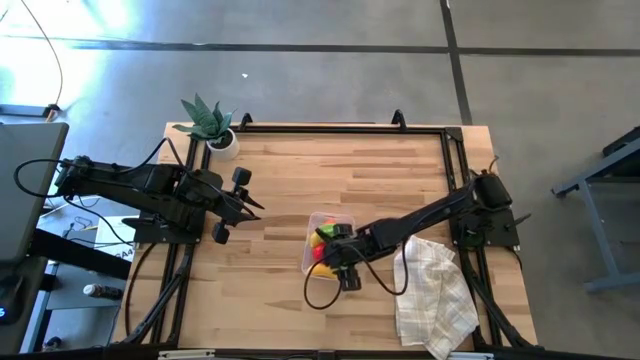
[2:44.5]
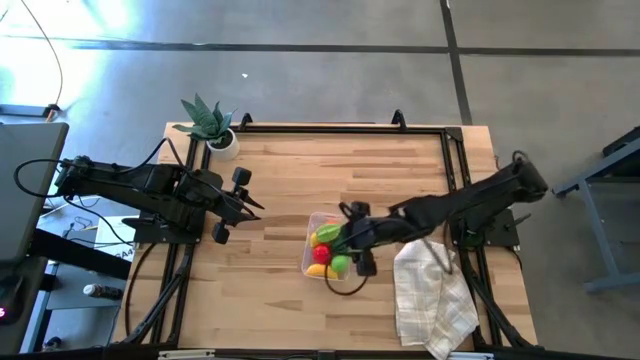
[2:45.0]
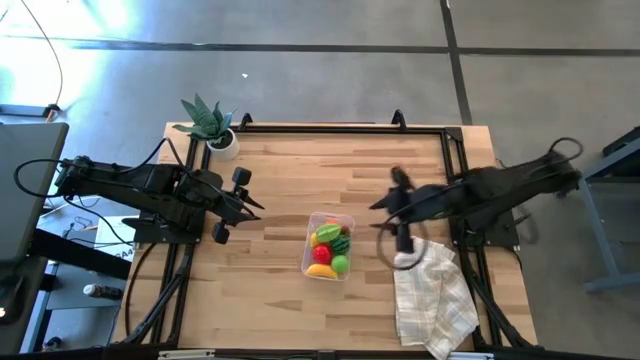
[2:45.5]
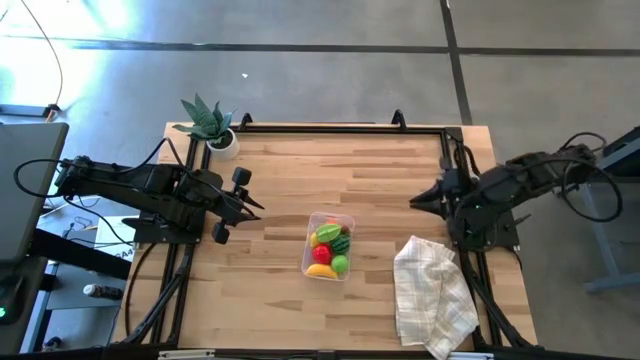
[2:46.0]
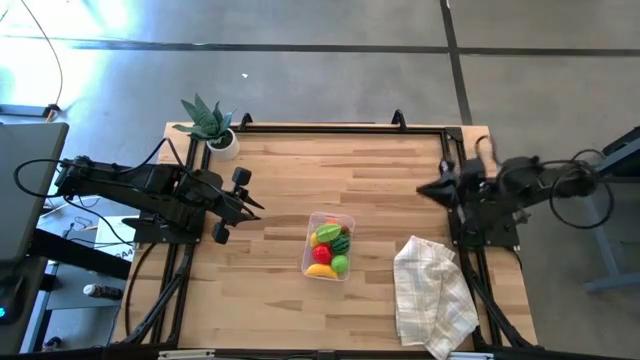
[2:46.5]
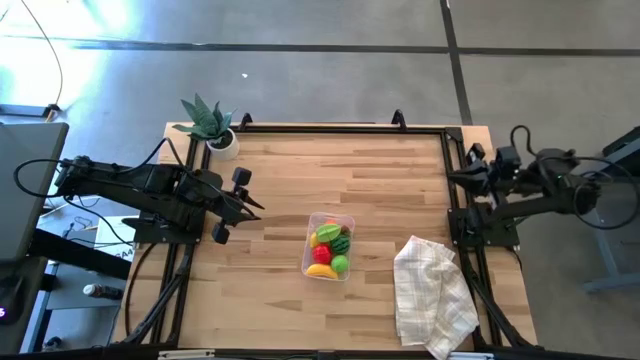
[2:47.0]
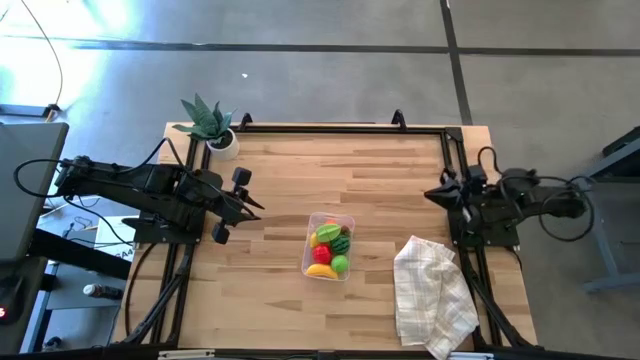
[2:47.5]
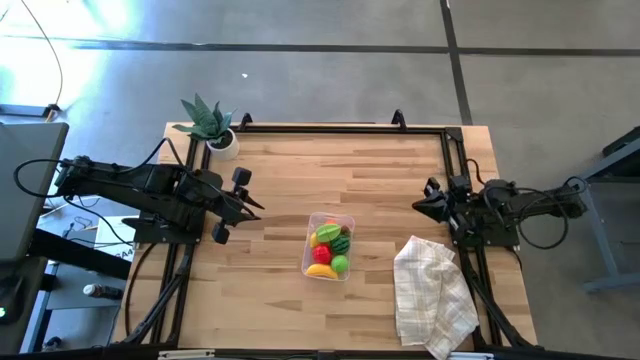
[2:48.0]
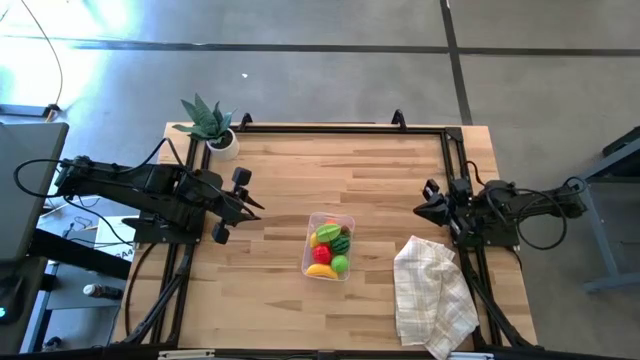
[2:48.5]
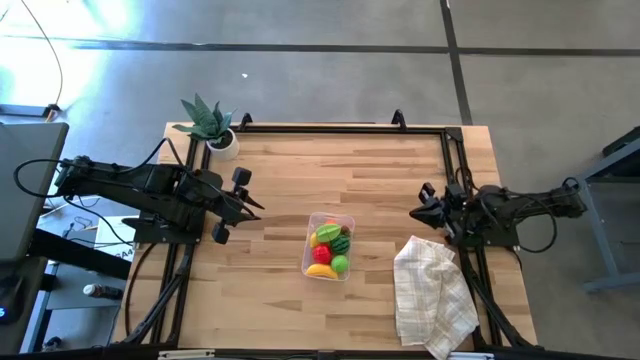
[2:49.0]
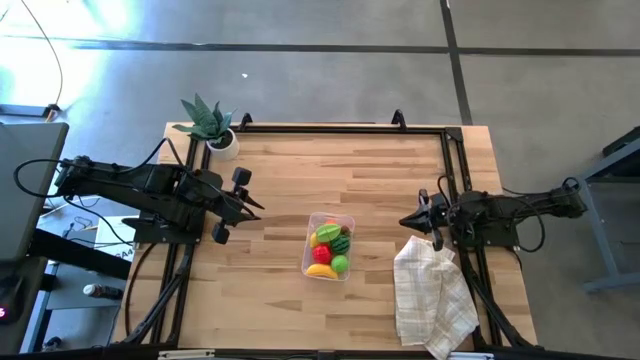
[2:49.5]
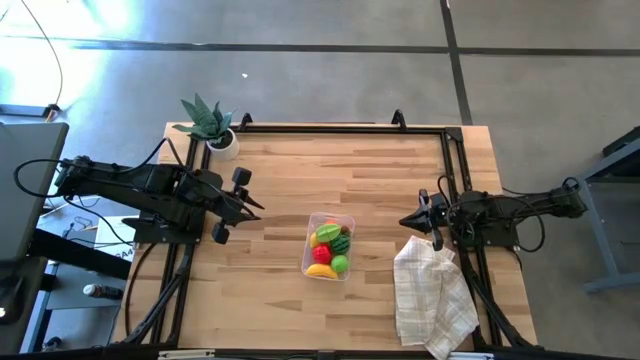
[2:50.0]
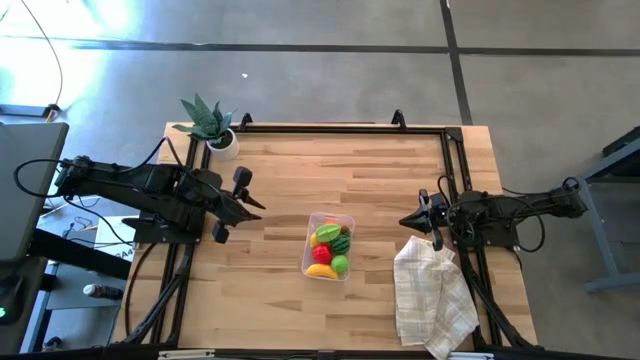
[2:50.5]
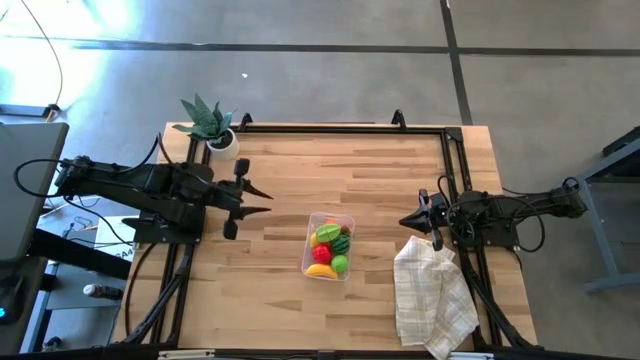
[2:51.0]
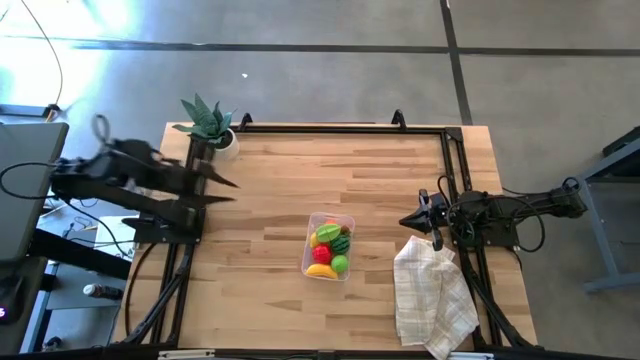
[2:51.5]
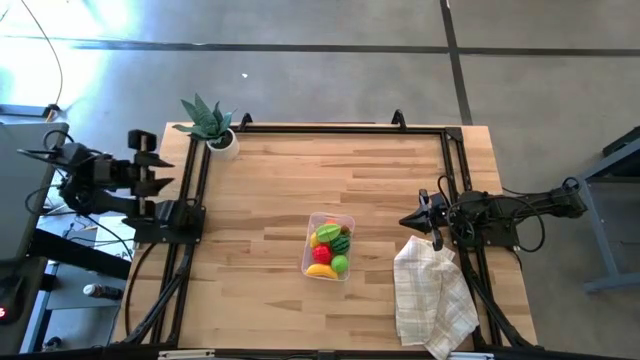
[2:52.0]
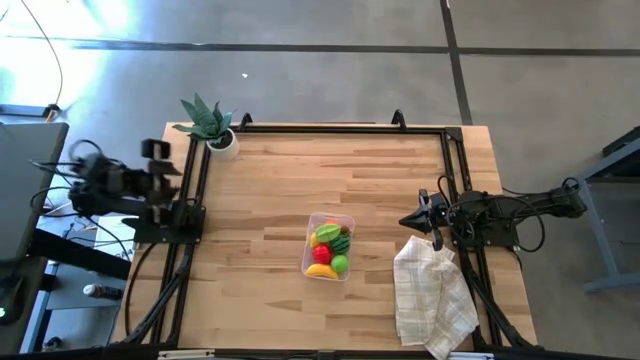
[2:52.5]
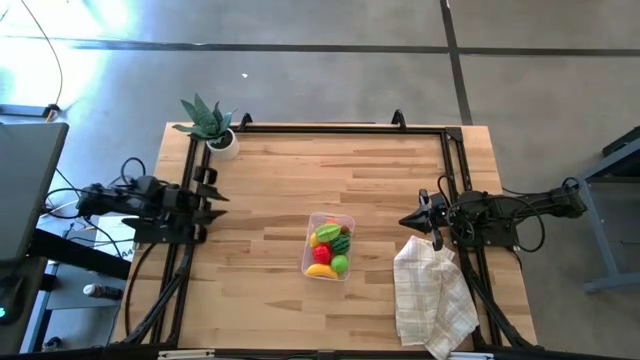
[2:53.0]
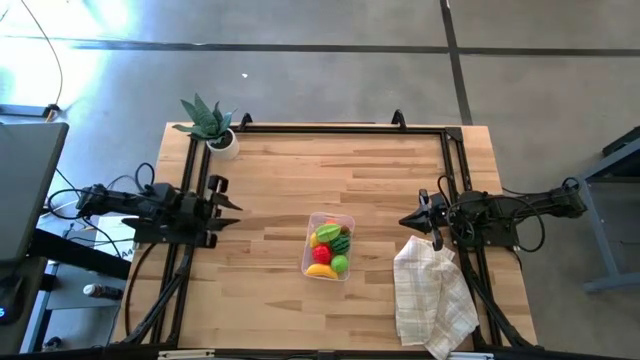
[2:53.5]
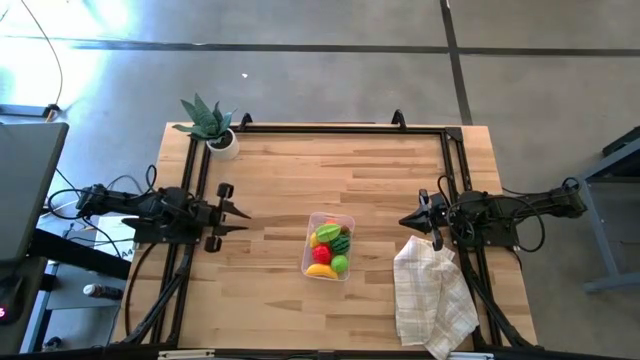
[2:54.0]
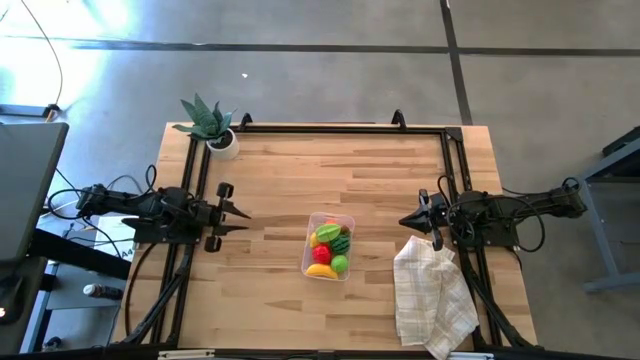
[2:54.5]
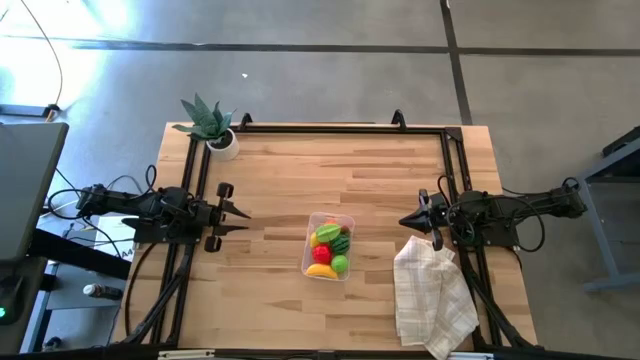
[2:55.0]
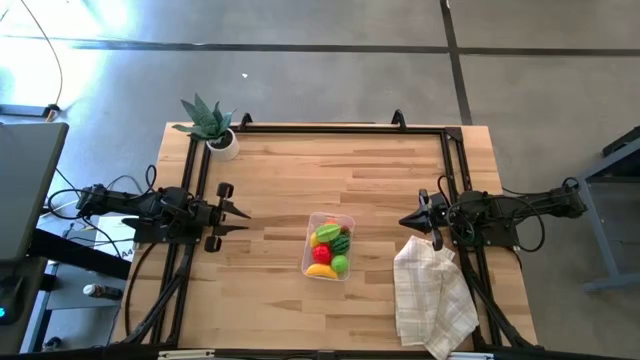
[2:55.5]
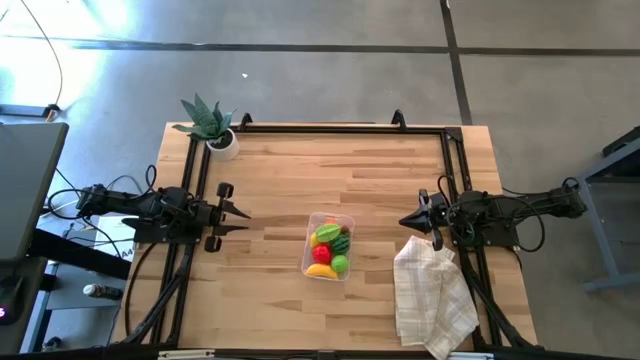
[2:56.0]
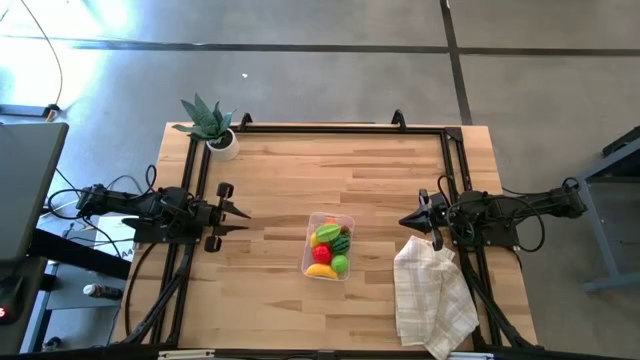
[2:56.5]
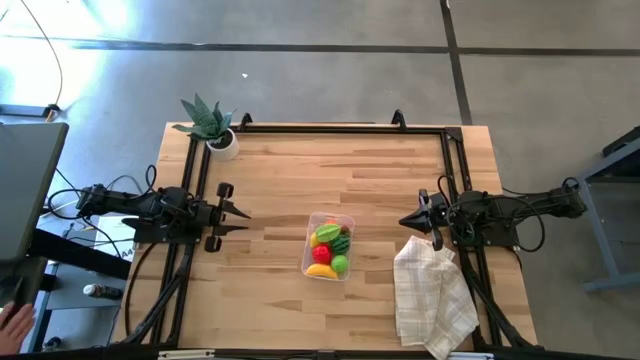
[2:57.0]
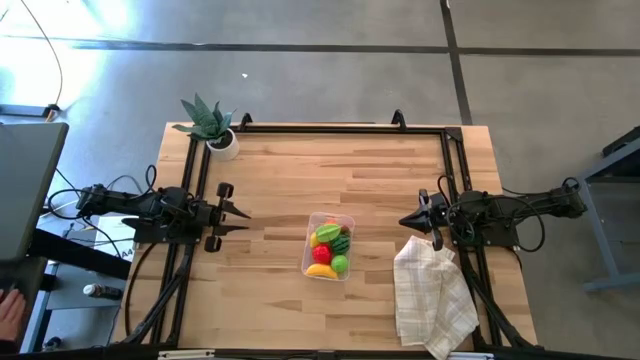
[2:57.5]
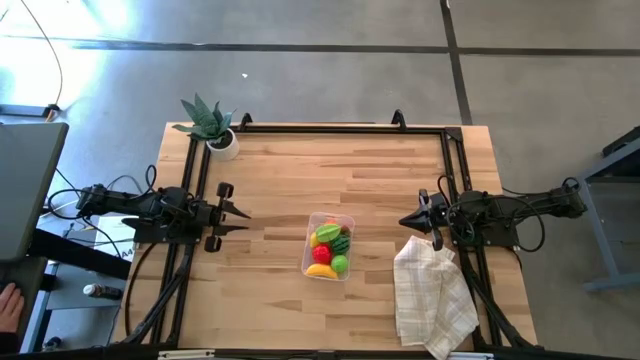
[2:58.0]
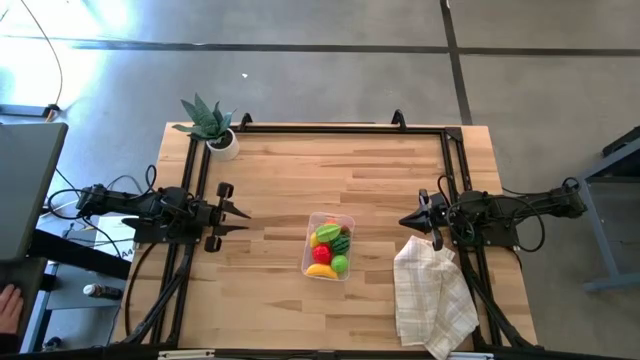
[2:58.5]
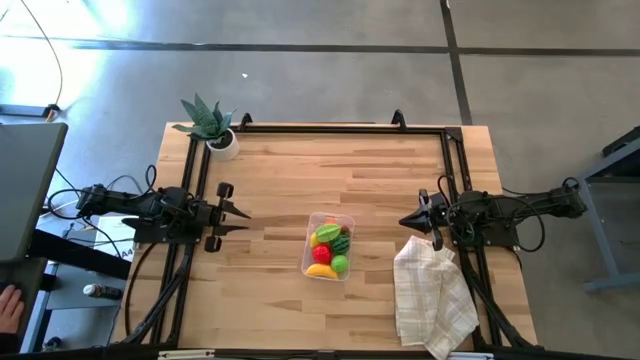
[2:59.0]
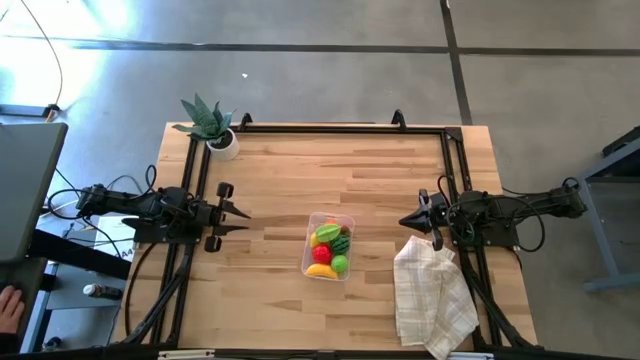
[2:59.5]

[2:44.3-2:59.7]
Task: Pick and placing Produce into tupperware
Return to Home Position
